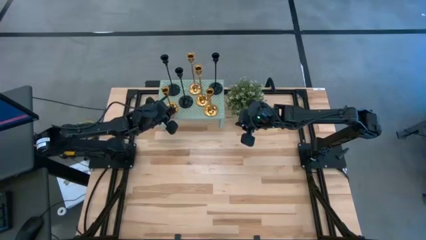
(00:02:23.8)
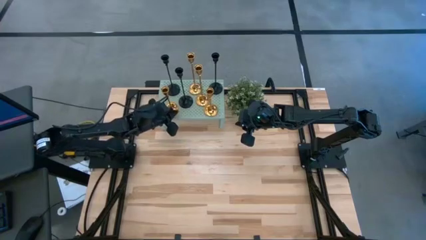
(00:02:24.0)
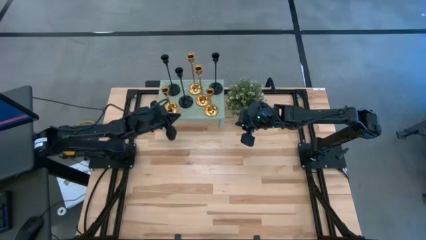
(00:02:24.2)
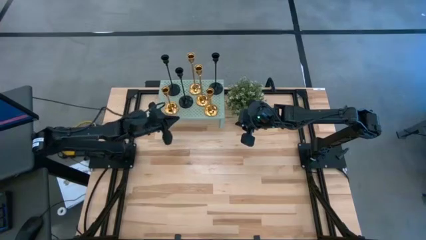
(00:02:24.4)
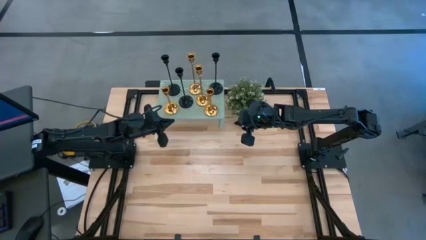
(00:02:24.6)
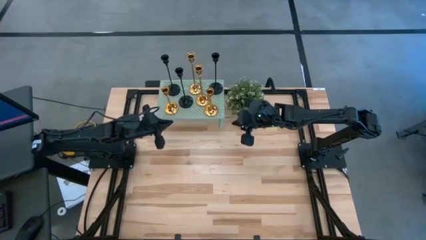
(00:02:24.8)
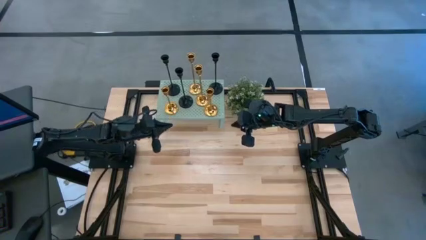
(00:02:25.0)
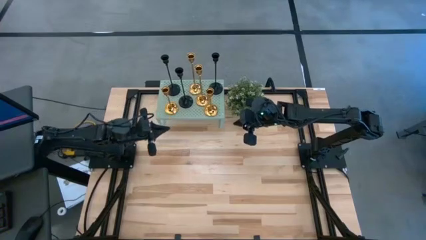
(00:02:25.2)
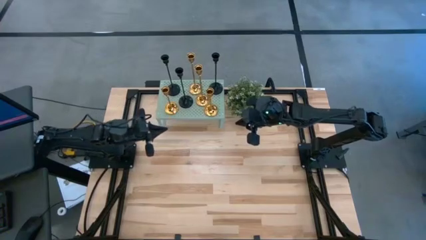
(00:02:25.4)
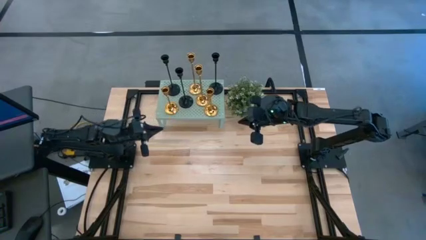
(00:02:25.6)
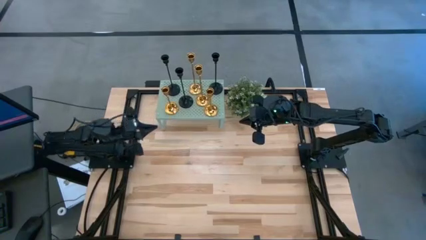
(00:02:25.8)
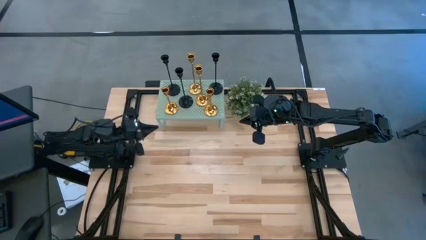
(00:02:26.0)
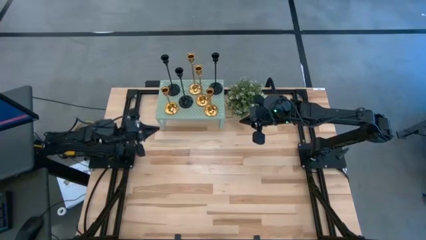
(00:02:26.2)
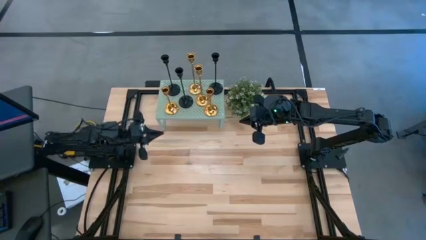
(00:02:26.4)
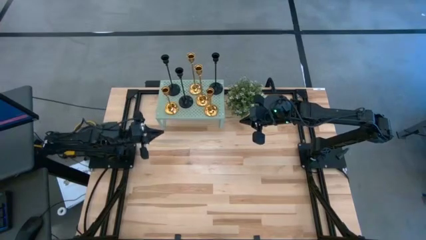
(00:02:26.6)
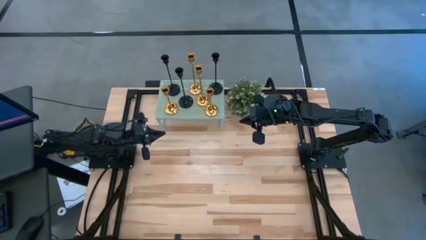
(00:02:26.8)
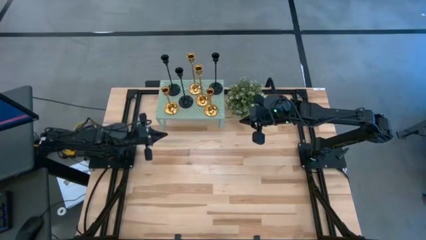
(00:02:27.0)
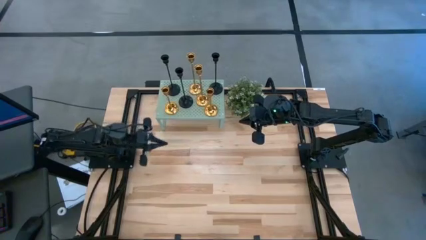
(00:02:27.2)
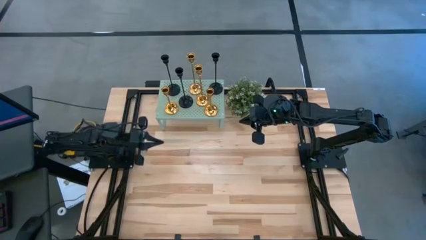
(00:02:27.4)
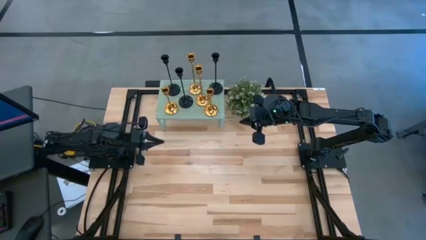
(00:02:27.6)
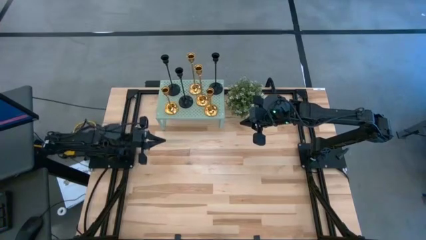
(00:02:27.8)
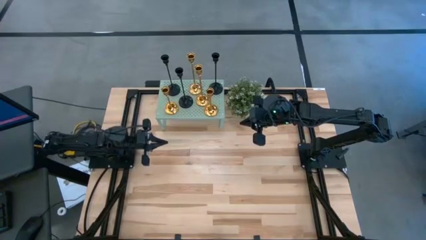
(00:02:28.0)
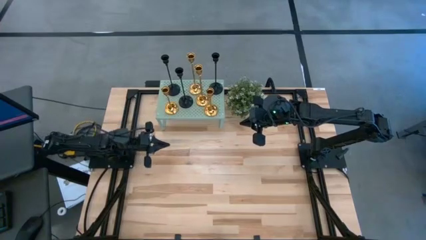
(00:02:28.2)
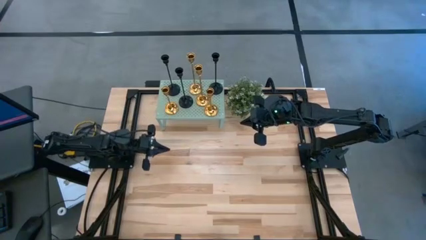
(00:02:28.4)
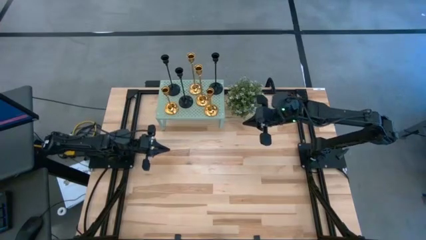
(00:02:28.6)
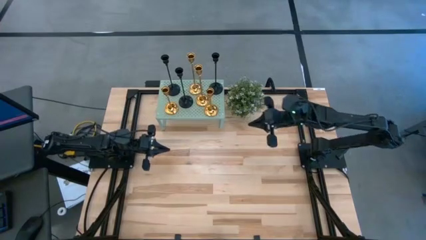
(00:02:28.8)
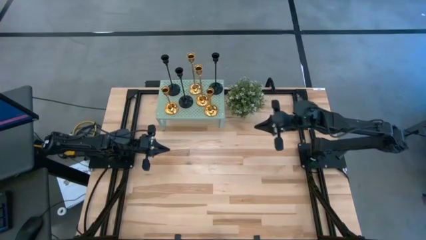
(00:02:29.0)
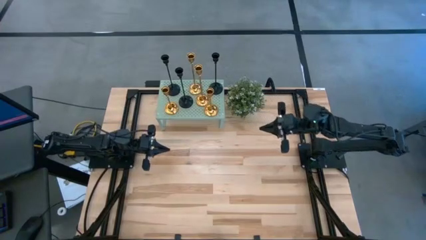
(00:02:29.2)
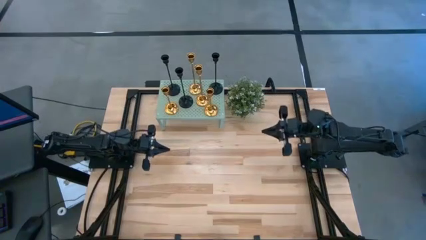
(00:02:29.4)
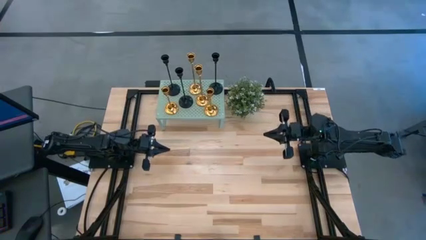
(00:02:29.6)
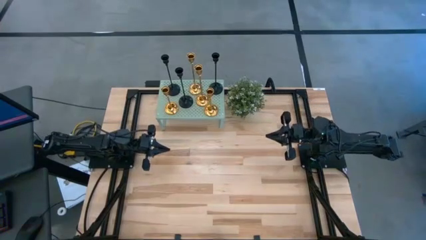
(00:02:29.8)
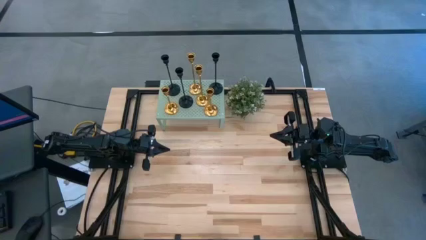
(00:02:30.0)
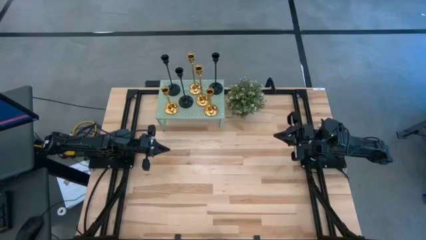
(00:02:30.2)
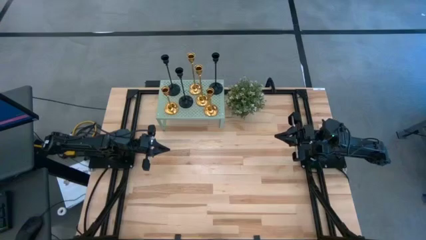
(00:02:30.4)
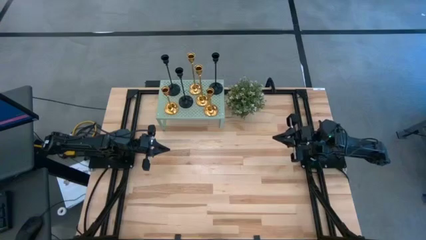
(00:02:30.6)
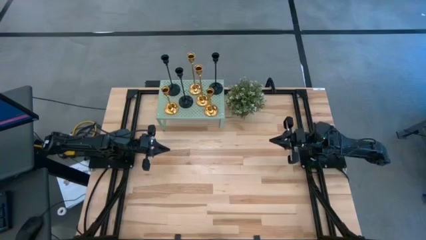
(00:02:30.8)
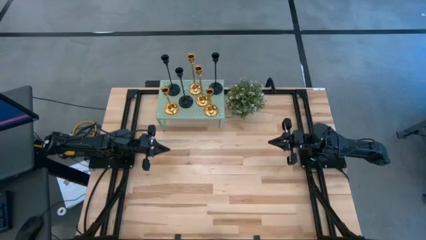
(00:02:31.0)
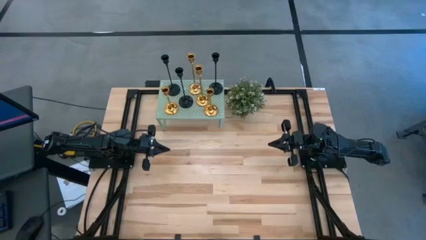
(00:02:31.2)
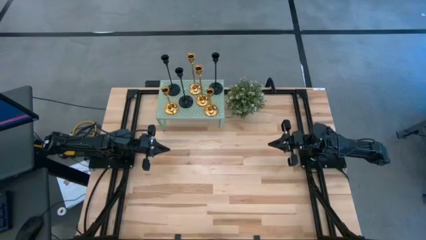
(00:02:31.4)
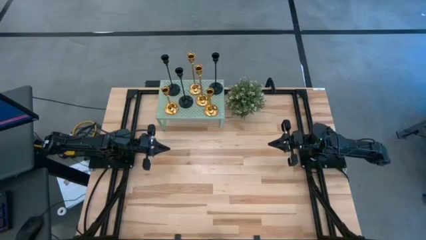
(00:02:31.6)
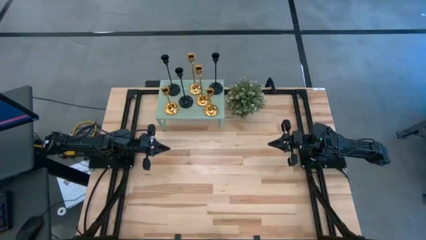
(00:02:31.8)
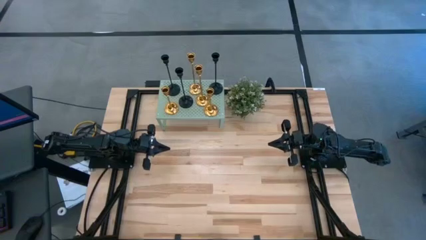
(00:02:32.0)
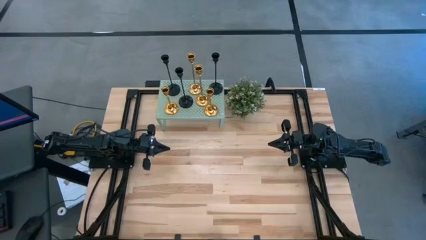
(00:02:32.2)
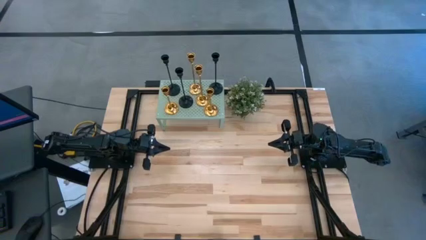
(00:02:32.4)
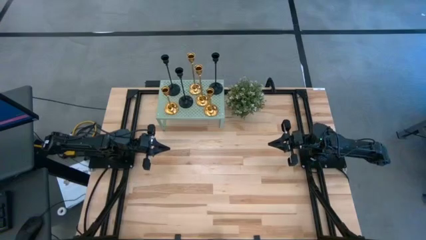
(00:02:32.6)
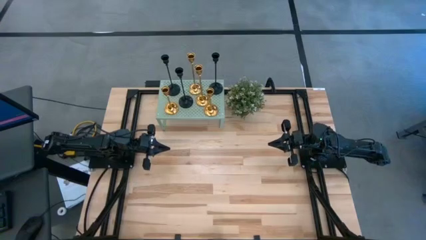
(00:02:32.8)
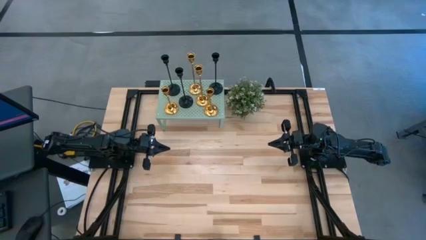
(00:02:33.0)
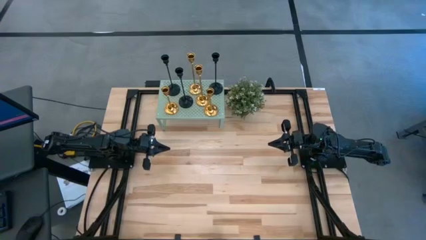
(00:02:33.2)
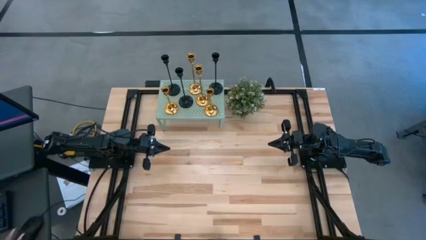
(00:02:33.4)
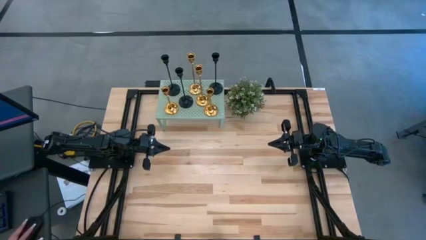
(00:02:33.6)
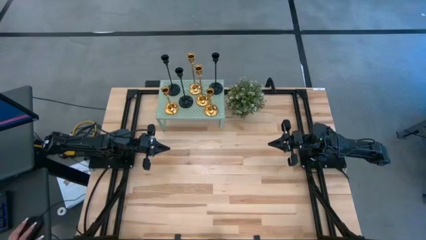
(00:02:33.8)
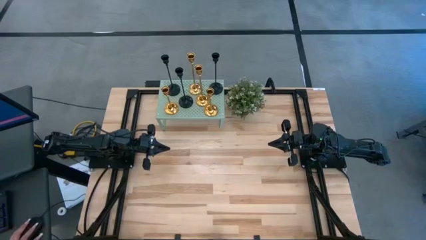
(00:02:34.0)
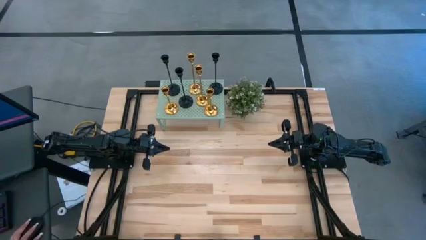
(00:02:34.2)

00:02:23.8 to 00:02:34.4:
Task: Pick & Place candle stick holders
Return to Home Position

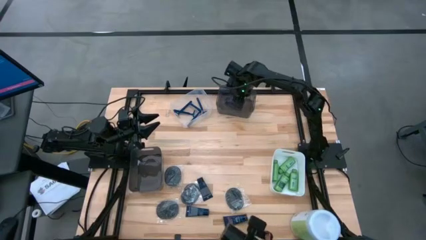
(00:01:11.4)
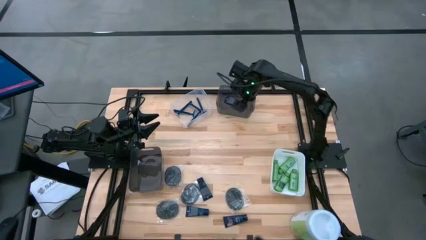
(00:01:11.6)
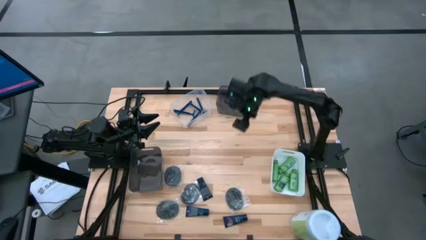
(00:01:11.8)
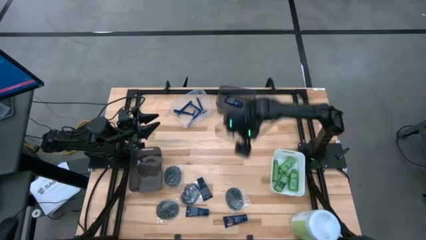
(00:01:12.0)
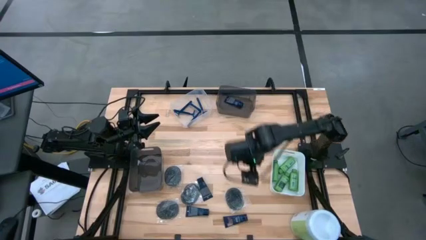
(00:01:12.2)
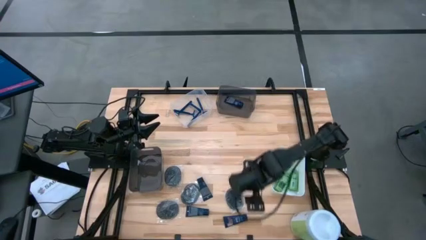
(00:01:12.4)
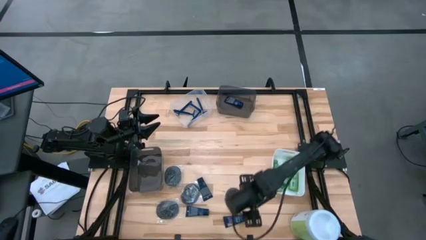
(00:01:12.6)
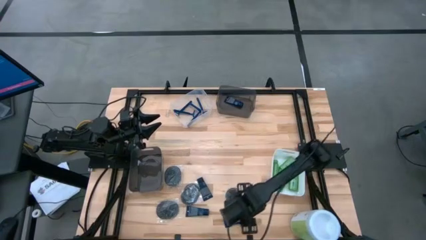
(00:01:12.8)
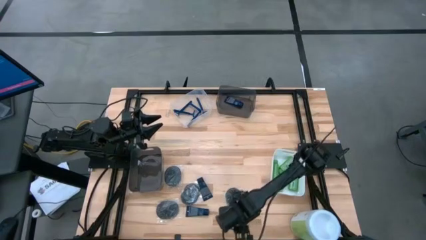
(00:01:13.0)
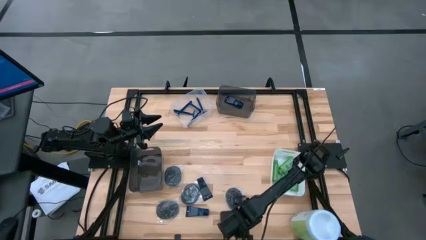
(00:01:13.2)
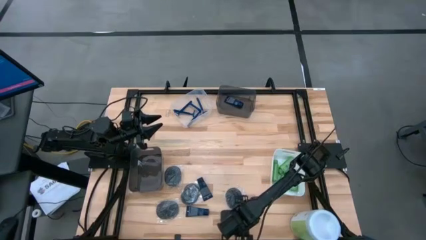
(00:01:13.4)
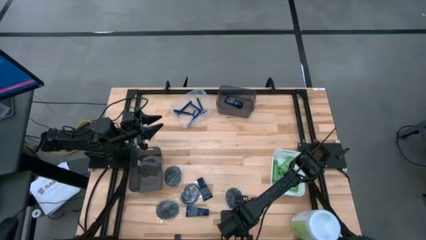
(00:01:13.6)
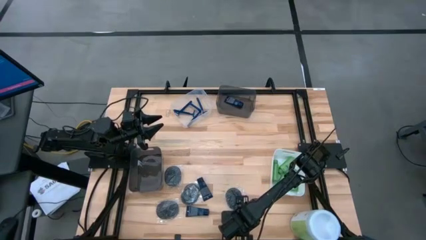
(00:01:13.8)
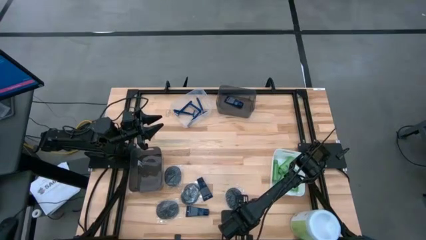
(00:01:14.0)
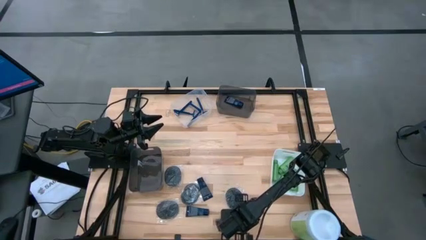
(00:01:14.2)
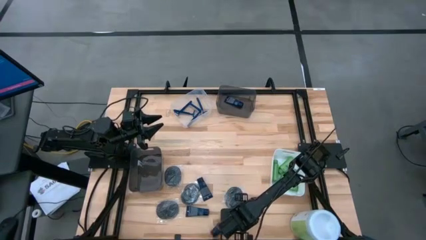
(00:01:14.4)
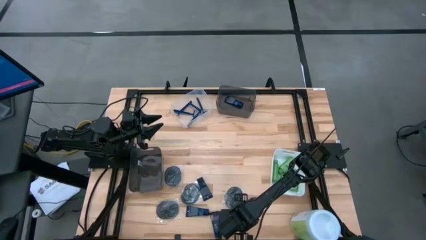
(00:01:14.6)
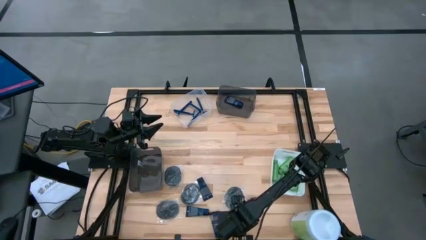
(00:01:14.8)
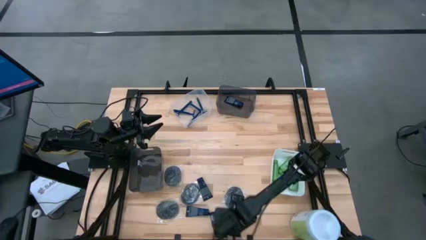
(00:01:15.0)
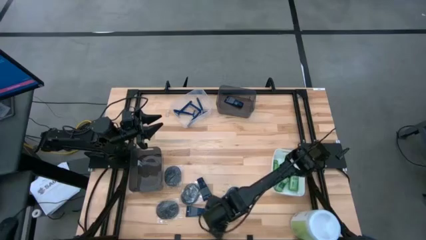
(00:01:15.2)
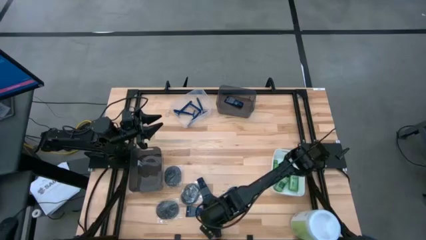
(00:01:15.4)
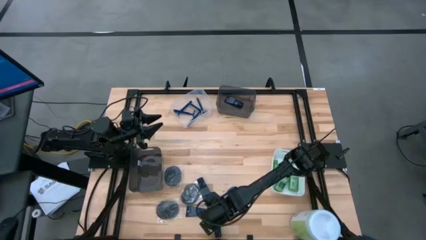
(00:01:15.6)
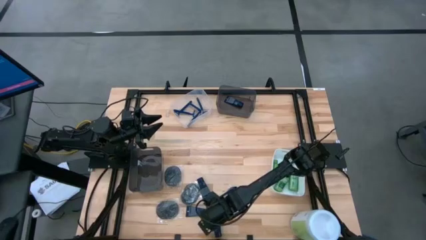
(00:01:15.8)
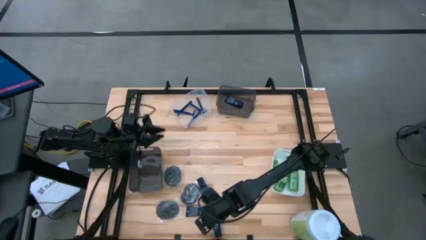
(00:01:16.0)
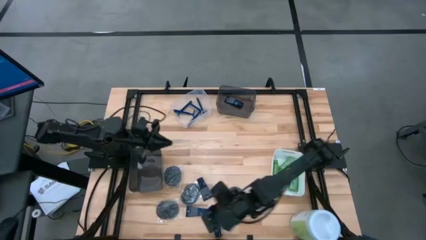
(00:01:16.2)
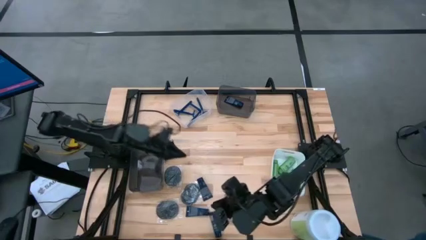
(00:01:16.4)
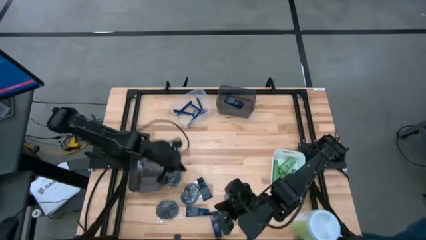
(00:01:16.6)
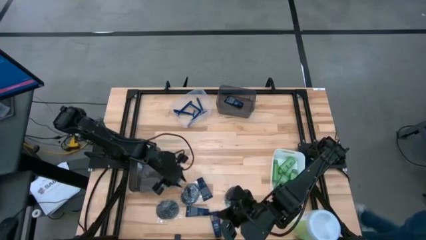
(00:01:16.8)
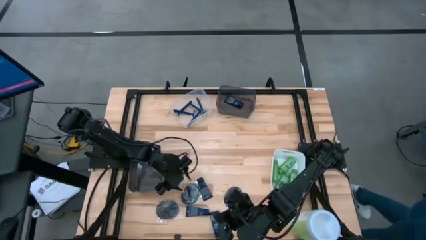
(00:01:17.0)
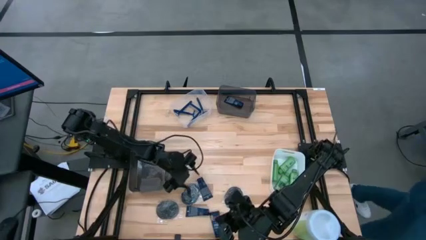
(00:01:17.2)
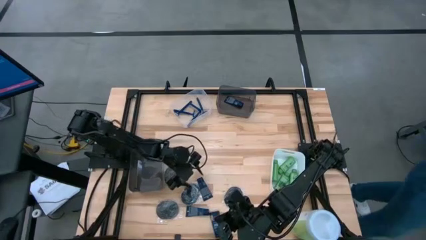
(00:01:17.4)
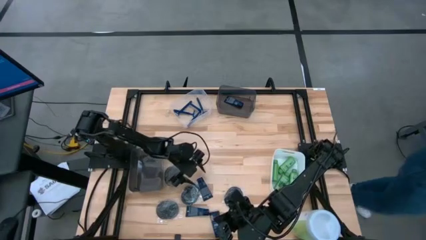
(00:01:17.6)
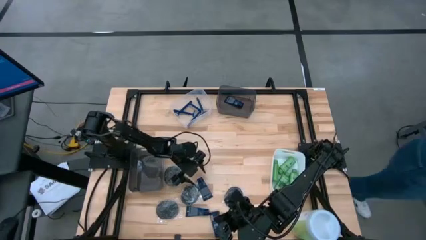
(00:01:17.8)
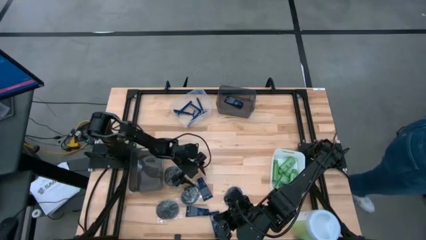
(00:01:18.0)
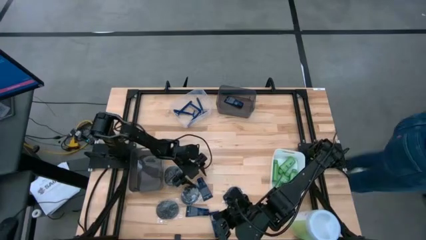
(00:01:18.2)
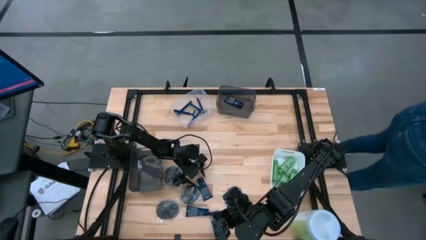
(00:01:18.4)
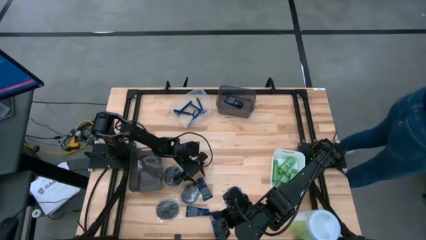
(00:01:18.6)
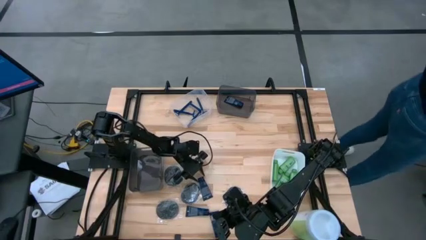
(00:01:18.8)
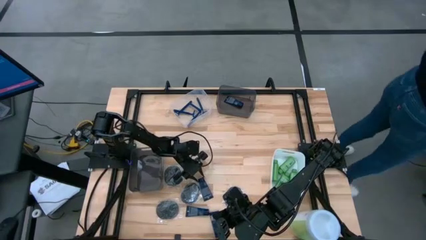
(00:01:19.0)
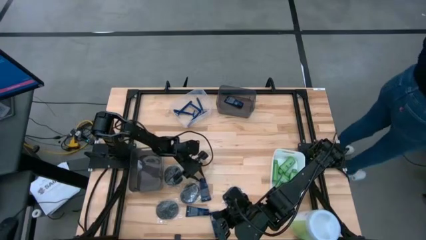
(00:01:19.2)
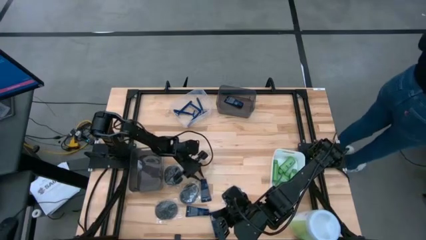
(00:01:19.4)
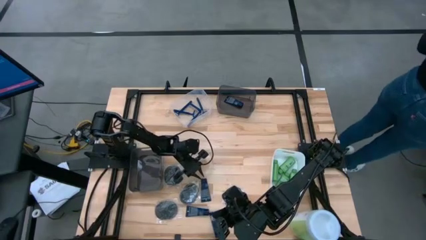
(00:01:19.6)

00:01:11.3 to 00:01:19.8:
Task: Pick & Place Travel size toiletries
Put the blue shave cream into the top black bin
